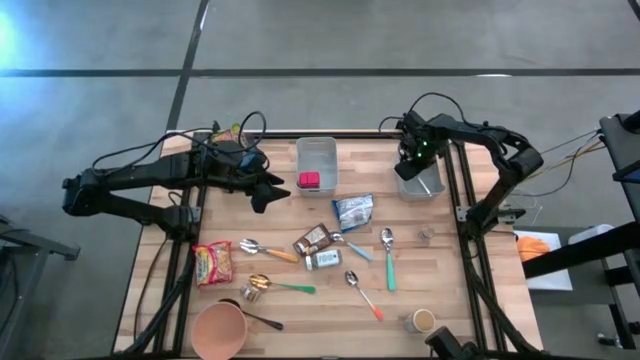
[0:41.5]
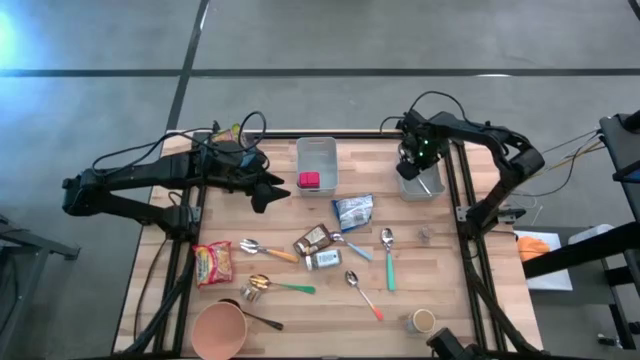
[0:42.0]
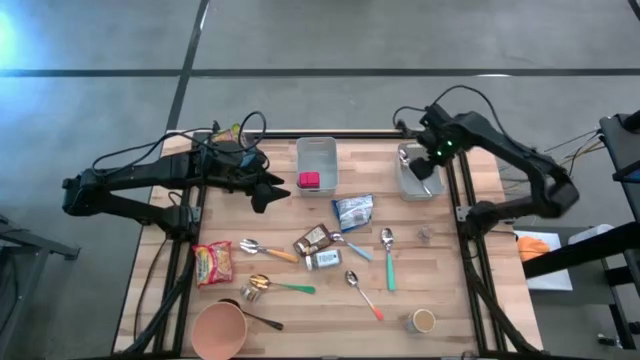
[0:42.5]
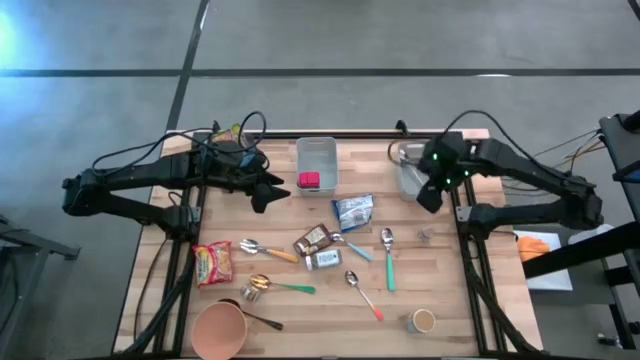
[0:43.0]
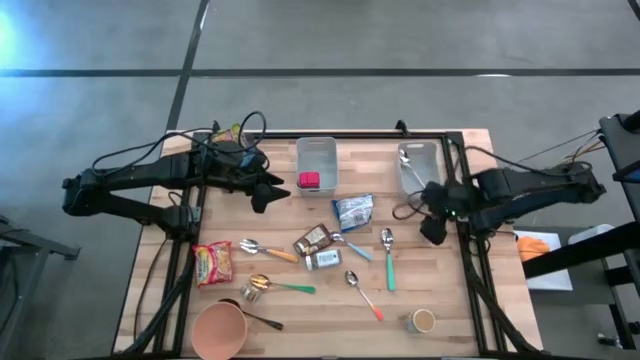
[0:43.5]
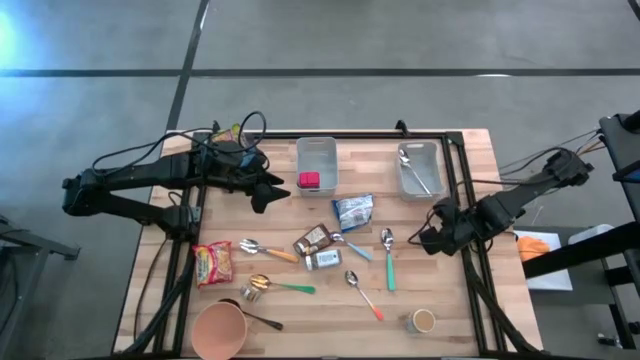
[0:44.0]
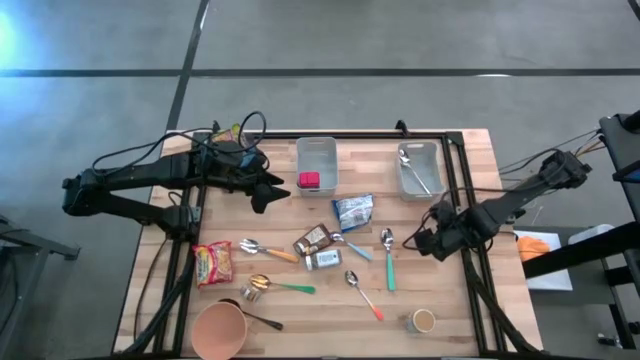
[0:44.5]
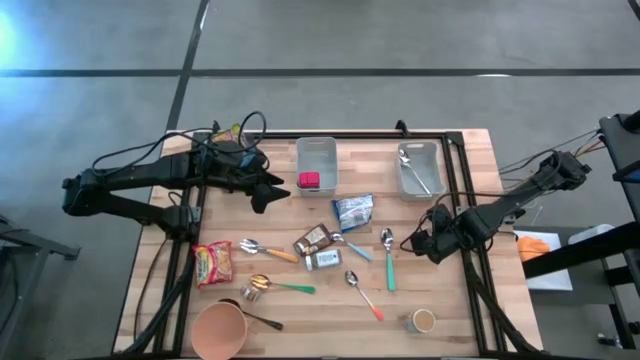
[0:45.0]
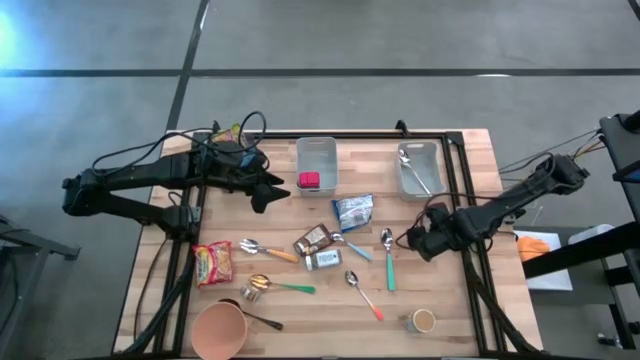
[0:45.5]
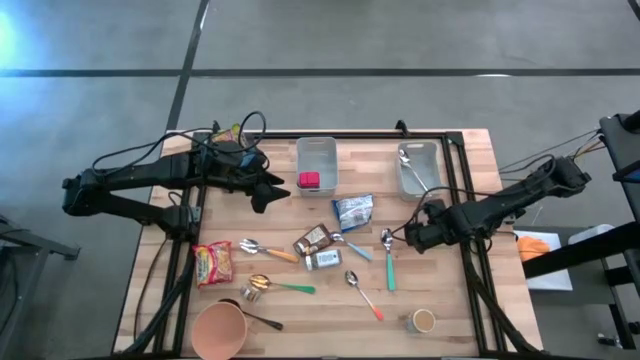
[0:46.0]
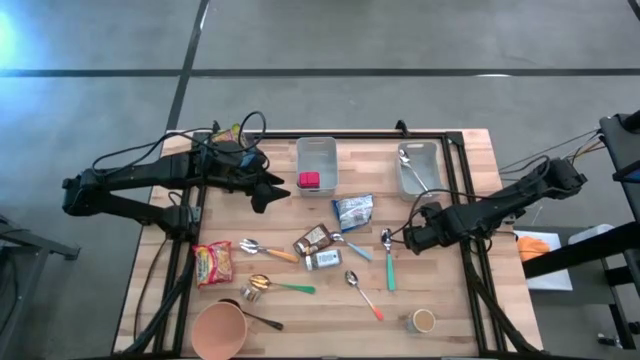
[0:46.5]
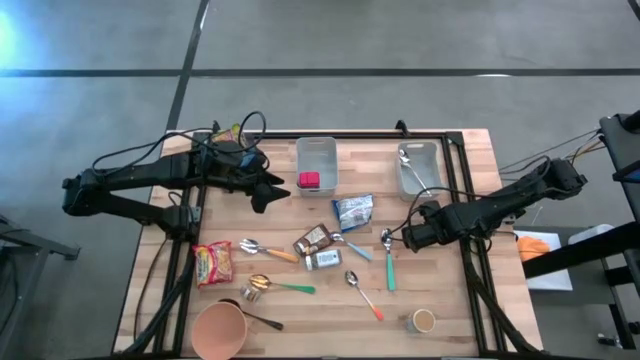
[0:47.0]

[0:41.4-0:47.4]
Put the right brown seasoning bottle into the left gray bin

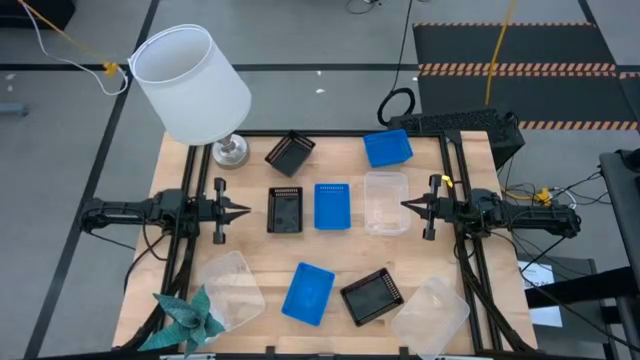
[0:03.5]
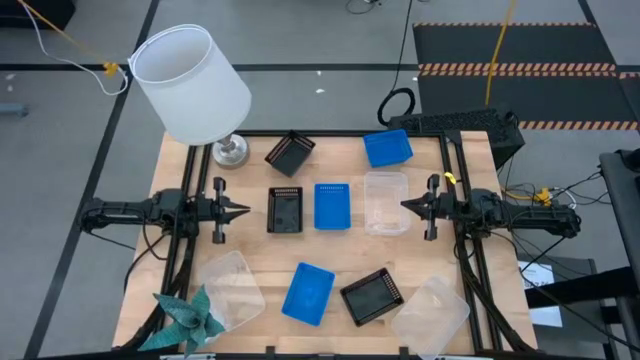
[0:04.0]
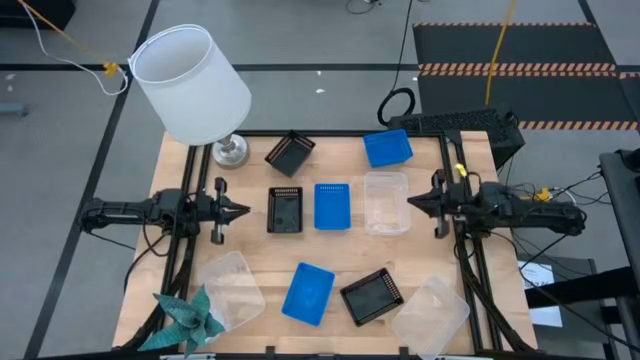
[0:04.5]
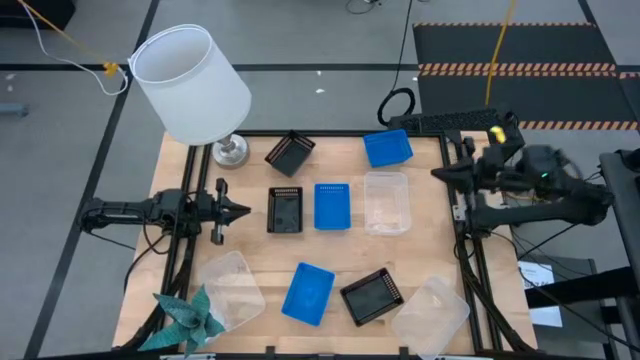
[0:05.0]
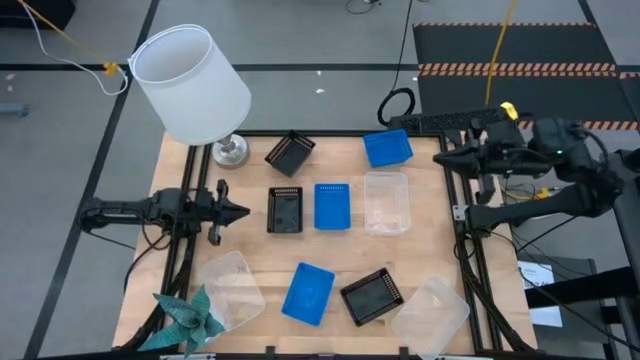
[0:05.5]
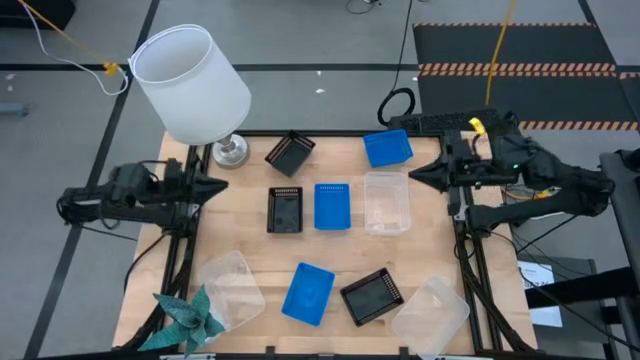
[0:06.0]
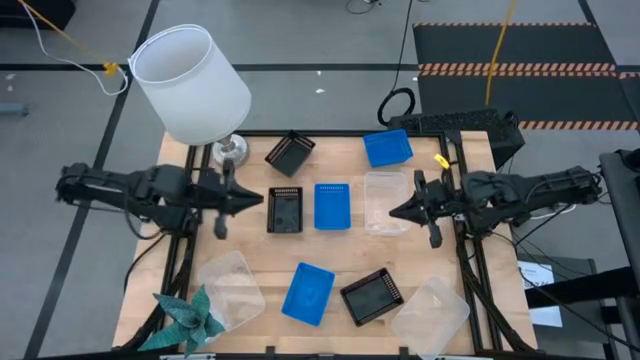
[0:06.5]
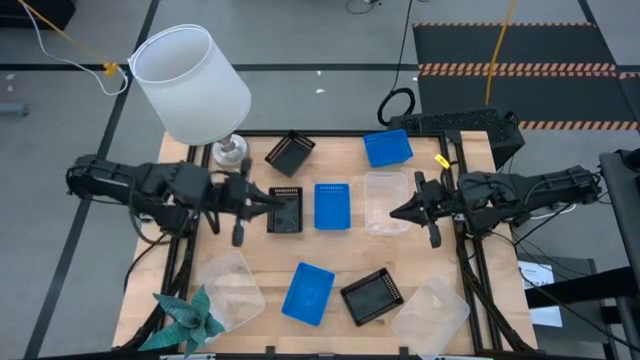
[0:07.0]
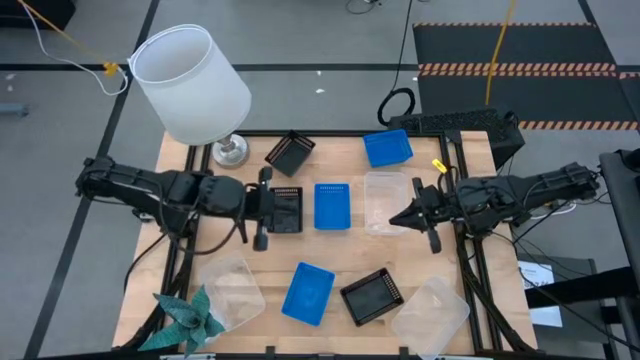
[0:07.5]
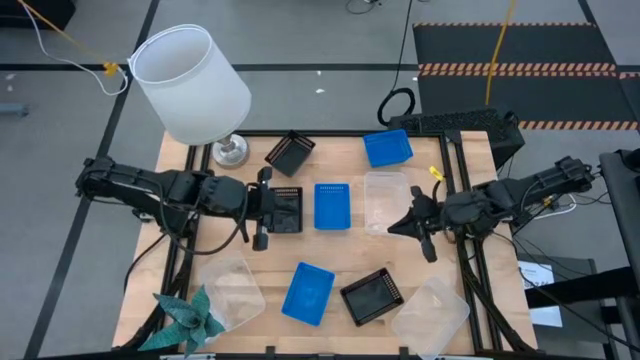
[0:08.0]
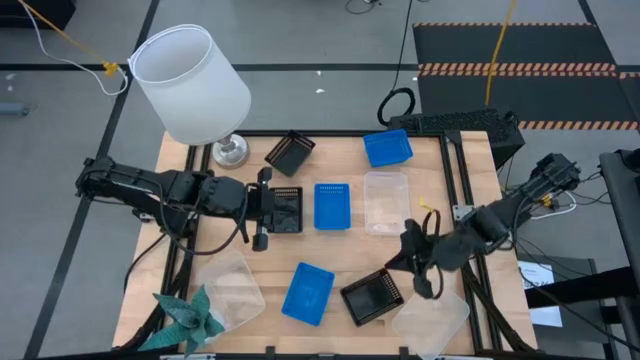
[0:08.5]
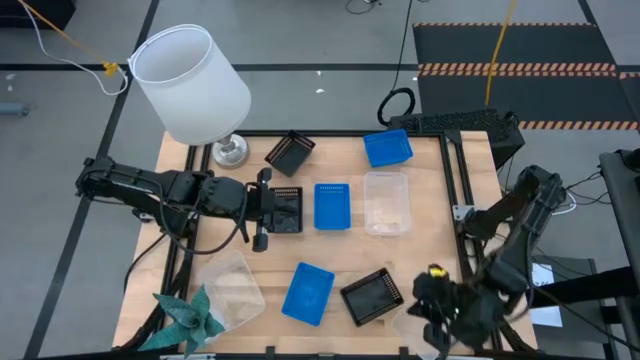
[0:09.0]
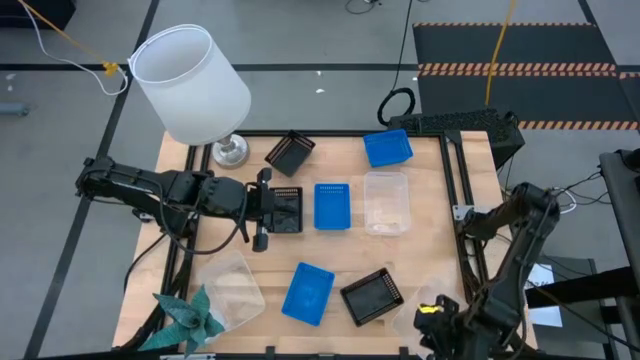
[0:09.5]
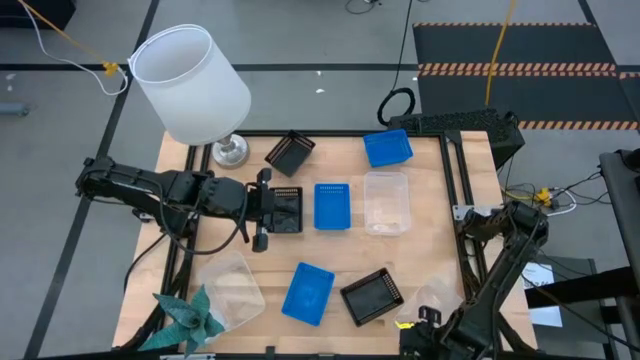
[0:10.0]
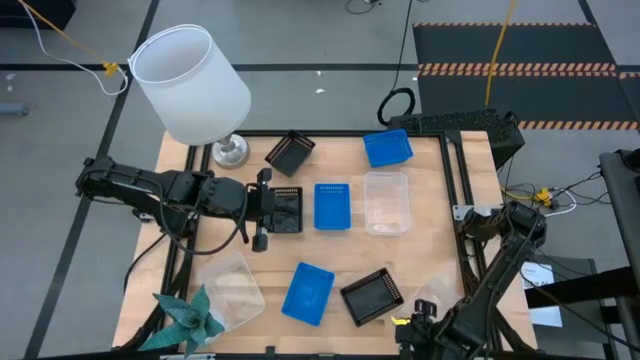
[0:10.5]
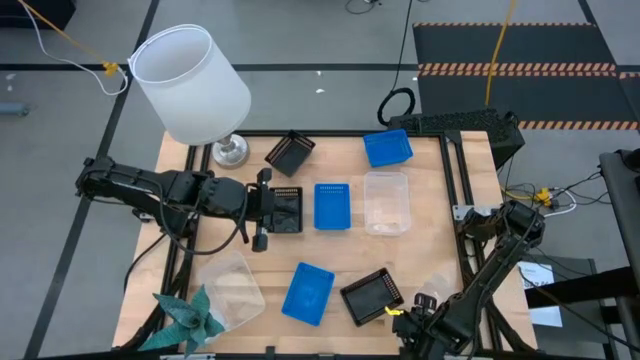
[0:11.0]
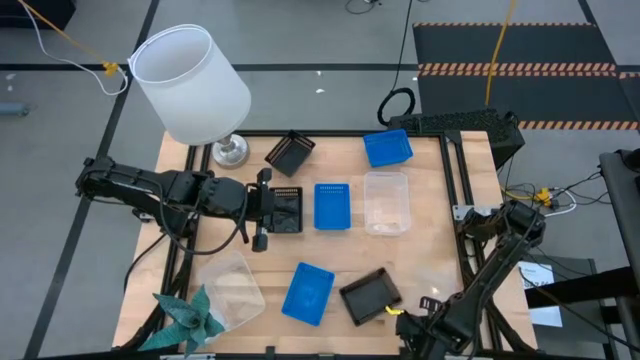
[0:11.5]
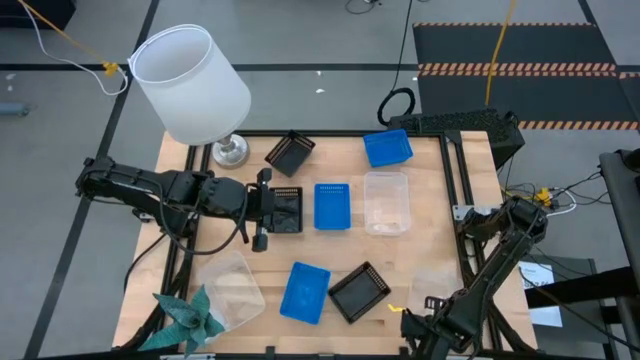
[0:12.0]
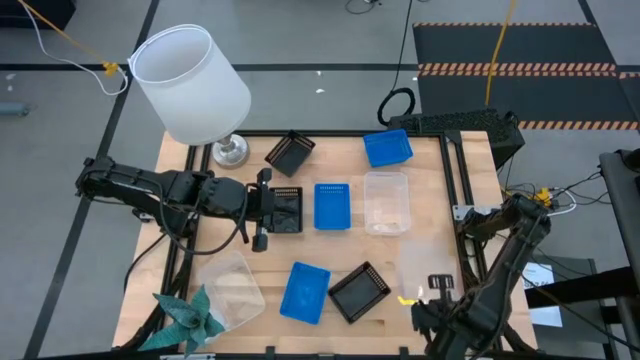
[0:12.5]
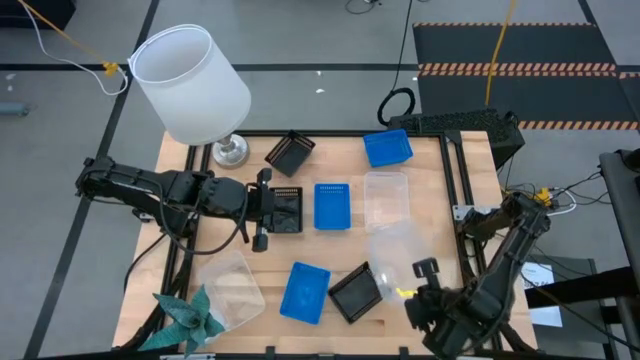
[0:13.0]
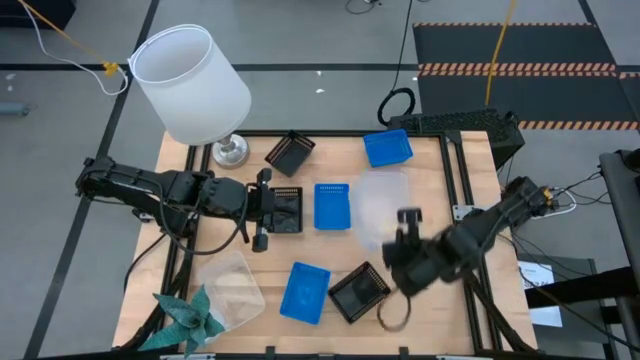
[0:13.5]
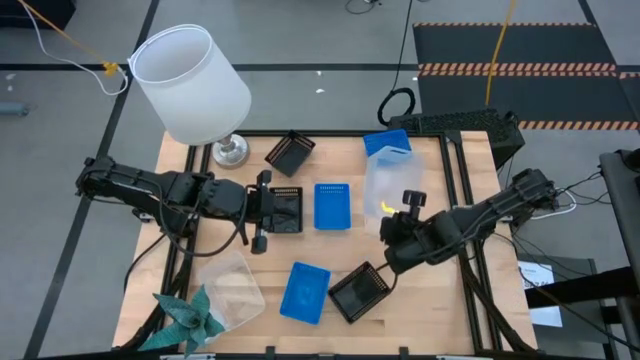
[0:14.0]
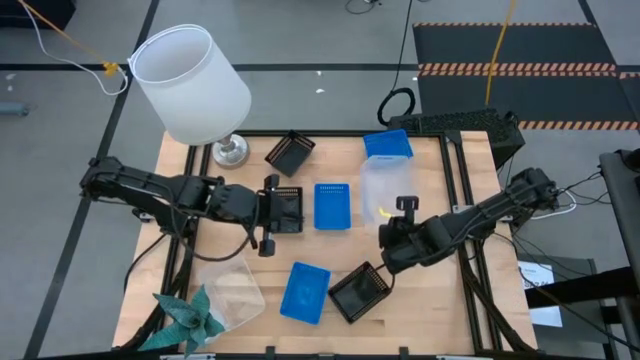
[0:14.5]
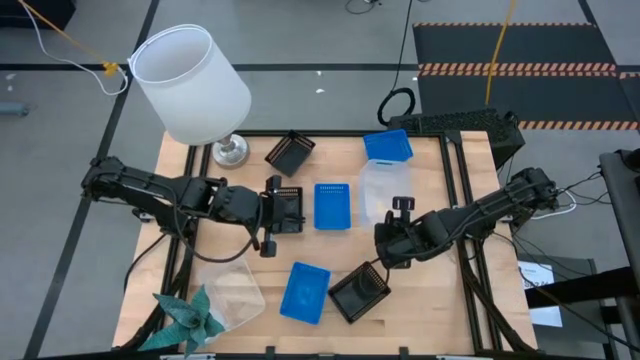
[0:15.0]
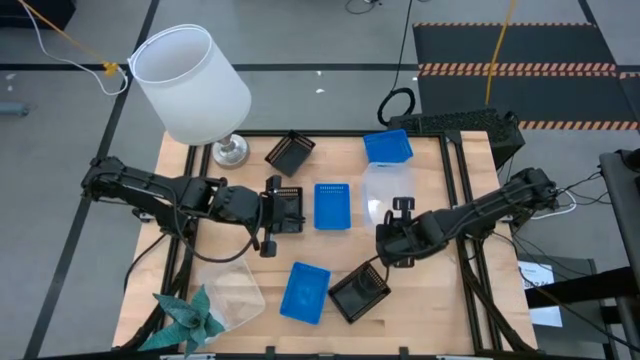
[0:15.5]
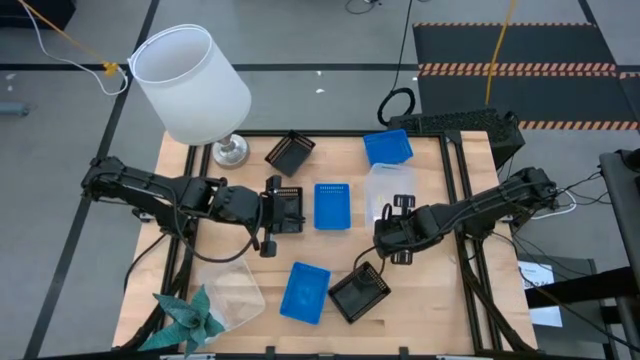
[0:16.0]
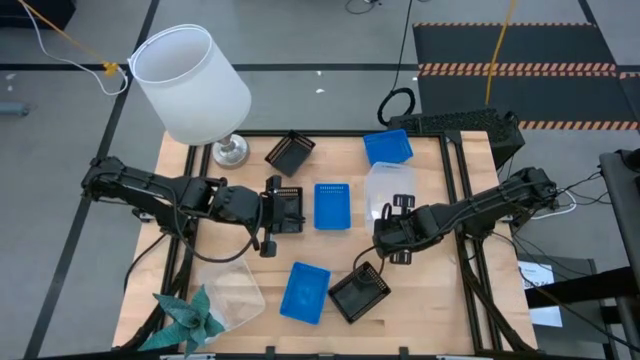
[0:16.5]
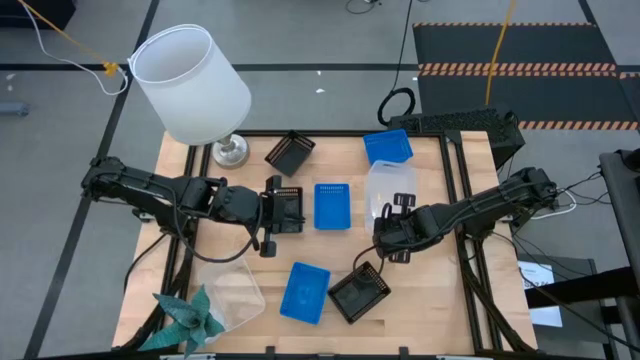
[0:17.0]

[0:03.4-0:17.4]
Stack the bottom right transparent bin on top of the top right transparent bin
